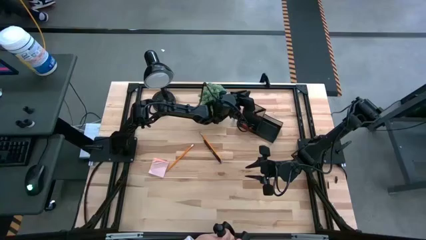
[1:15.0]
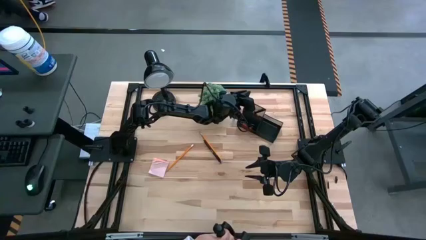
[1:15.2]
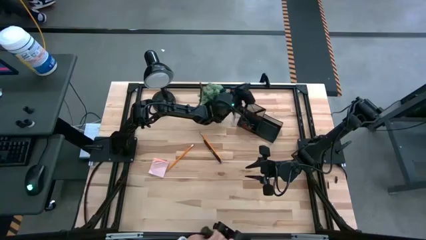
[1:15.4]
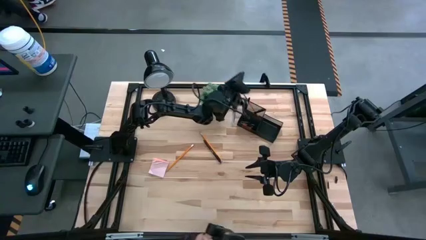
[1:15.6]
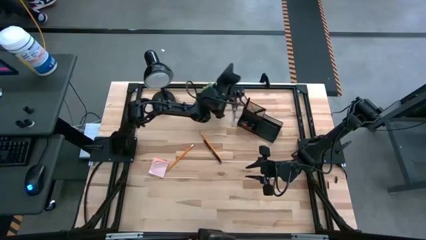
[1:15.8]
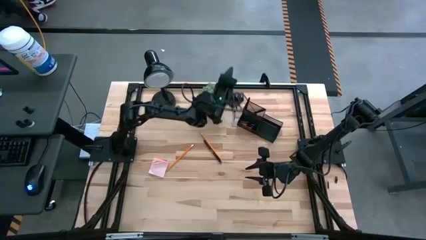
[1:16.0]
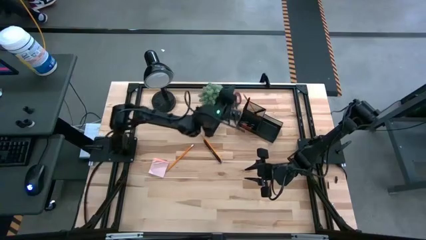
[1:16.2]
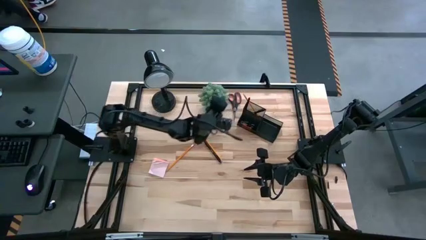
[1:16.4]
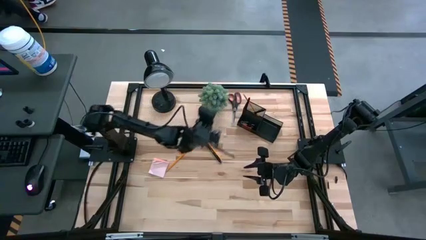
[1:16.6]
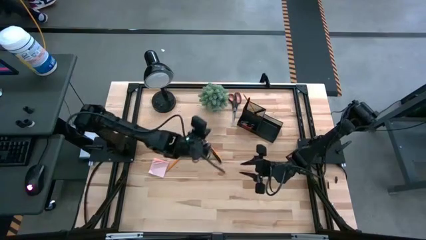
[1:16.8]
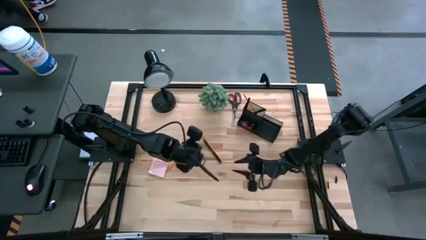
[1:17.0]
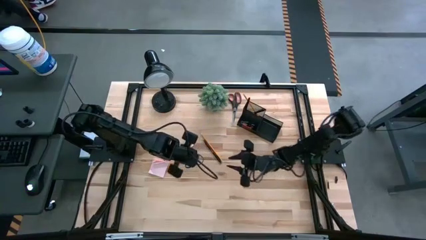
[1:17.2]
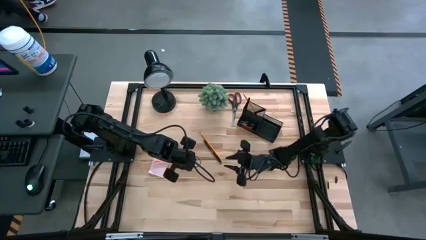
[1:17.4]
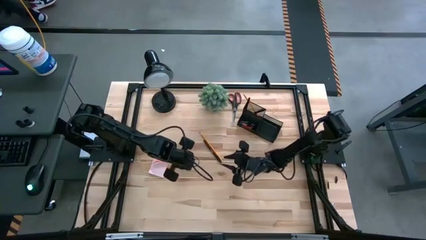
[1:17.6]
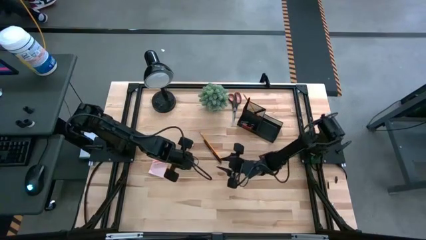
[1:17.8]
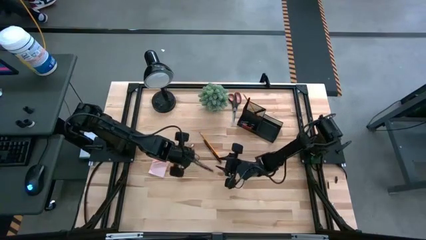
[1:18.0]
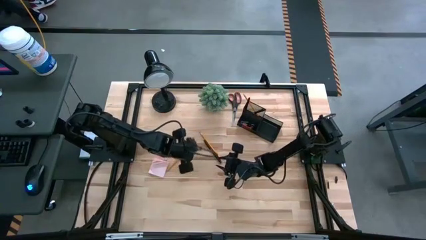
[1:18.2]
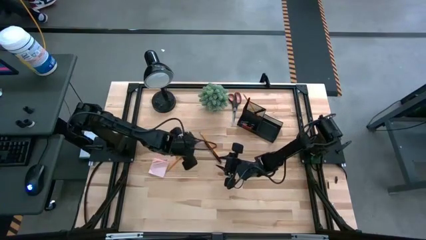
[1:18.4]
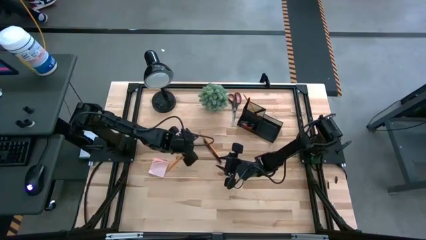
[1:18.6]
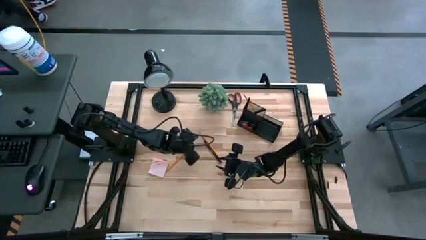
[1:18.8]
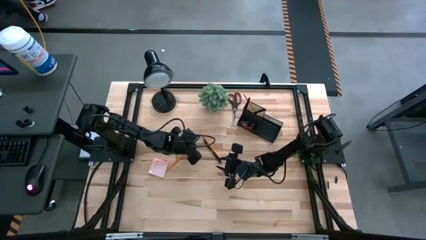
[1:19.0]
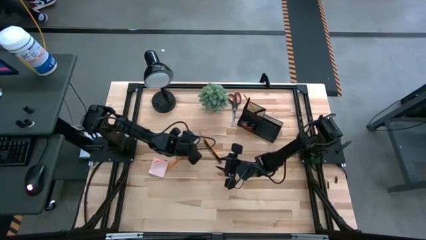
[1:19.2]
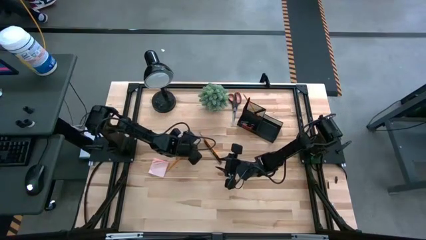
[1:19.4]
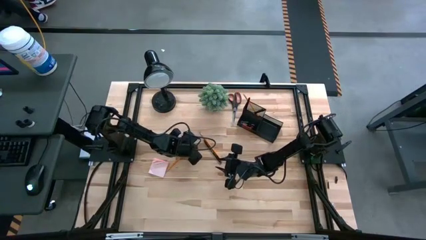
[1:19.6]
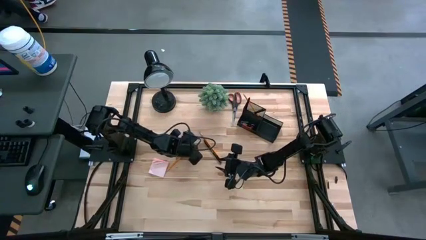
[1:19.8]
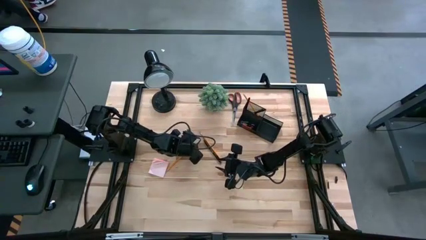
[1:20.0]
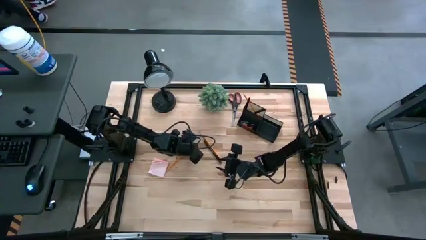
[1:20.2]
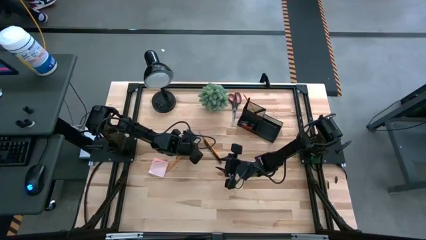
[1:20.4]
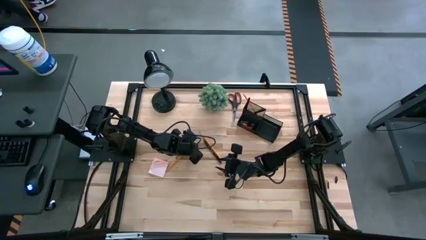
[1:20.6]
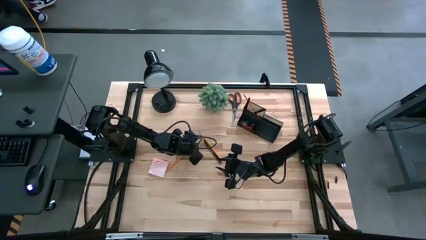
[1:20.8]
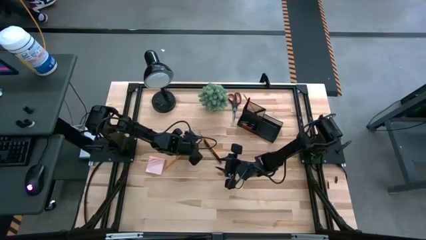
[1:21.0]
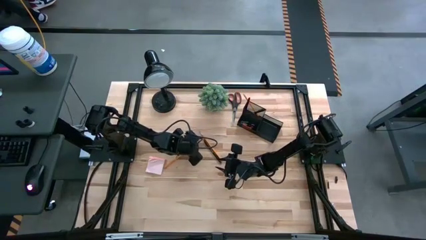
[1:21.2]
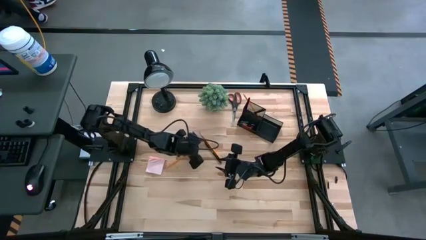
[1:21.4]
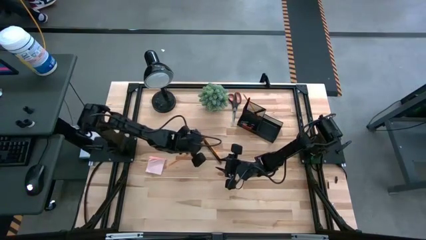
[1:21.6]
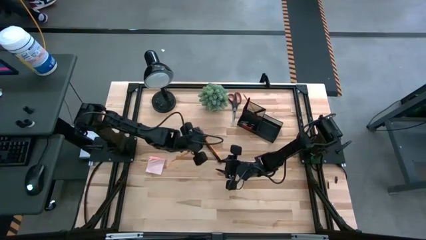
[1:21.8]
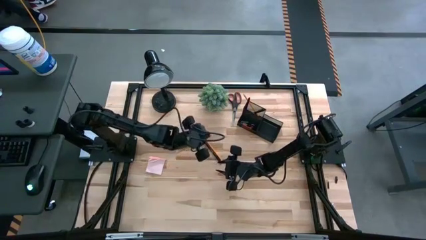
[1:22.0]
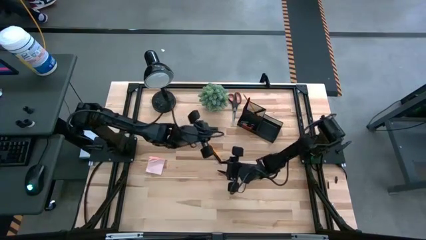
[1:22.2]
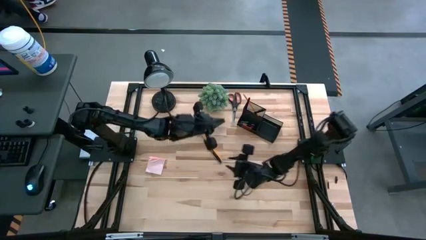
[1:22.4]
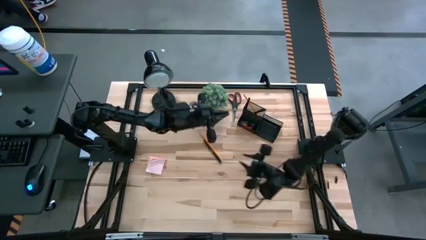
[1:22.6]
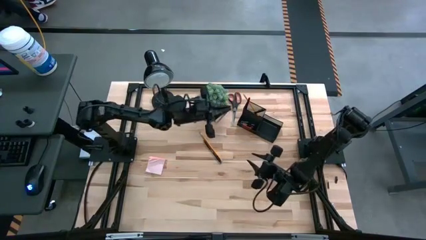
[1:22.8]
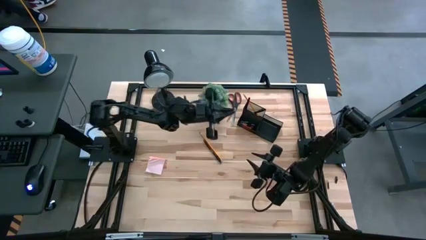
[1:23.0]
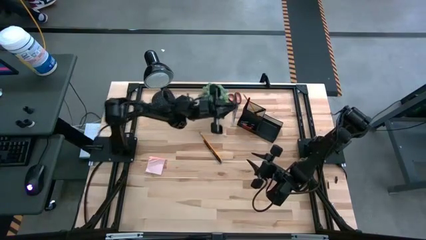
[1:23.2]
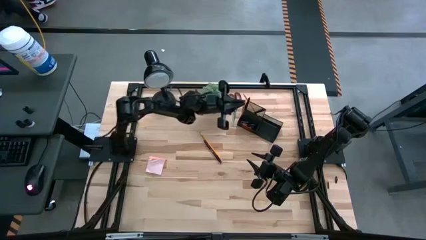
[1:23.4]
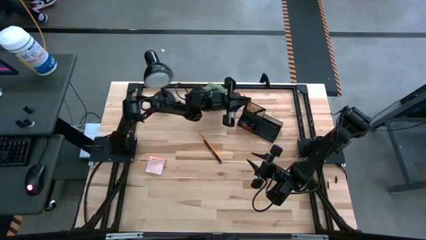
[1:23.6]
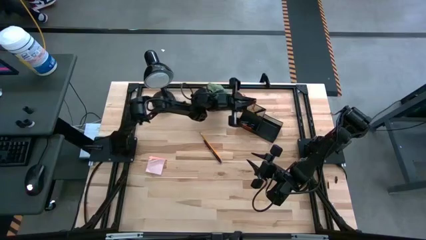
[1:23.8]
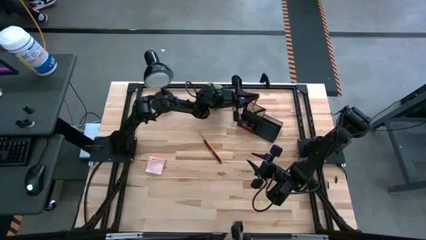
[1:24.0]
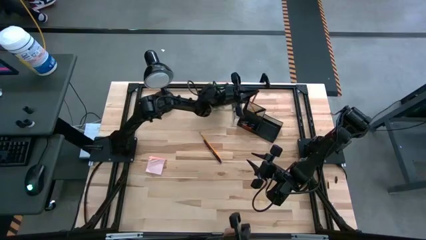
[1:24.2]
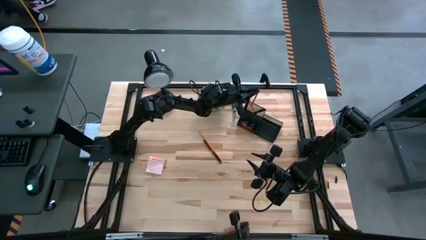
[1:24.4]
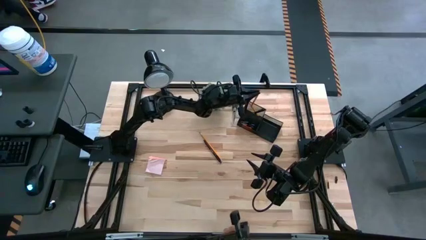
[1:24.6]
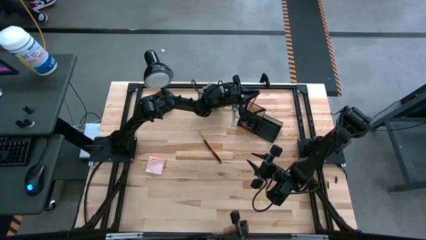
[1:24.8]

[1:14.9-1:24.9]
Task: Pick and place office supplies into organizer
Put the left orange pencil into the black desk organizer

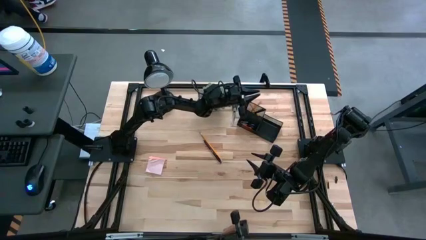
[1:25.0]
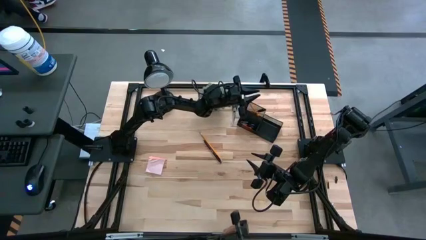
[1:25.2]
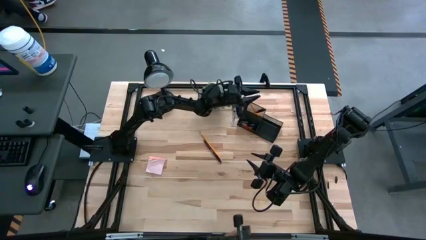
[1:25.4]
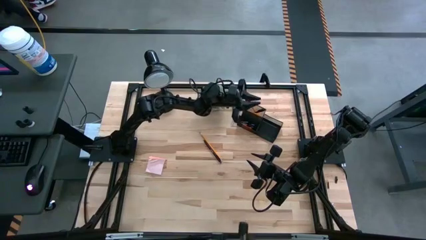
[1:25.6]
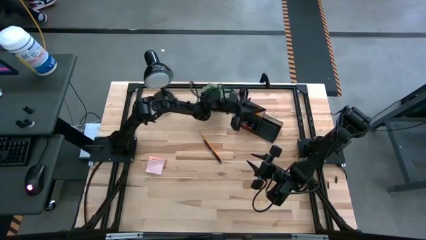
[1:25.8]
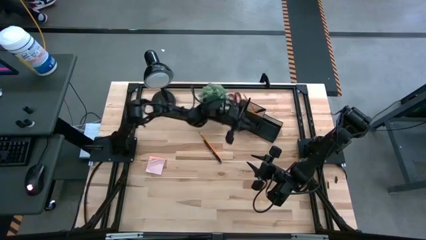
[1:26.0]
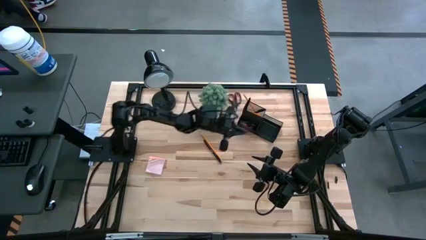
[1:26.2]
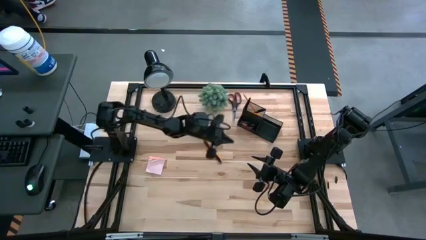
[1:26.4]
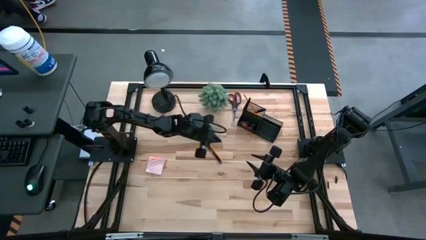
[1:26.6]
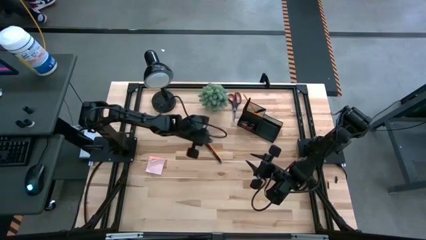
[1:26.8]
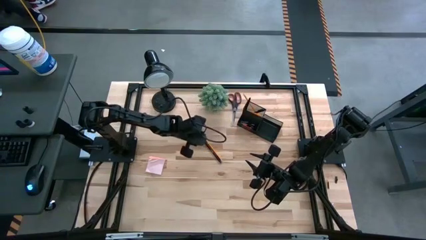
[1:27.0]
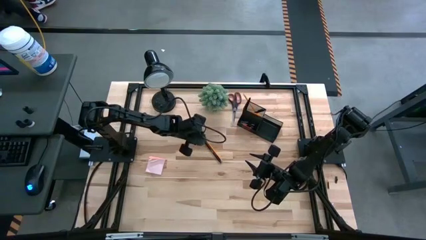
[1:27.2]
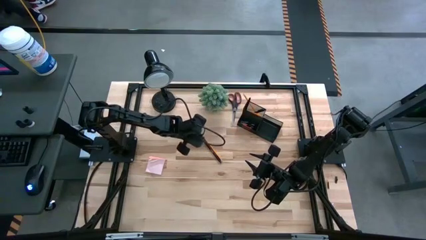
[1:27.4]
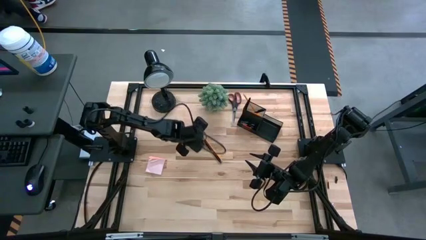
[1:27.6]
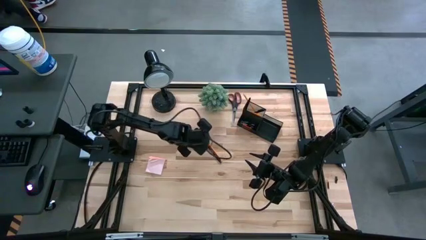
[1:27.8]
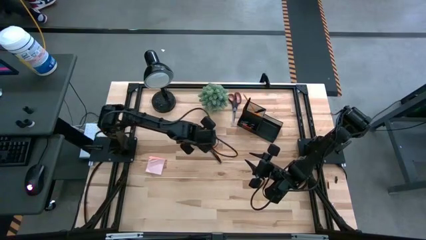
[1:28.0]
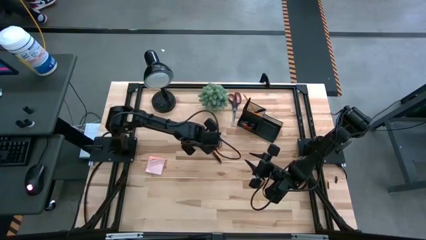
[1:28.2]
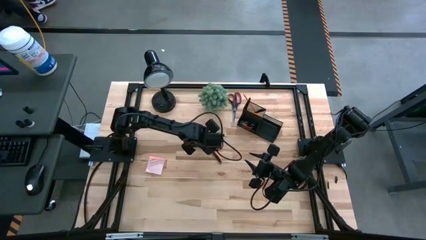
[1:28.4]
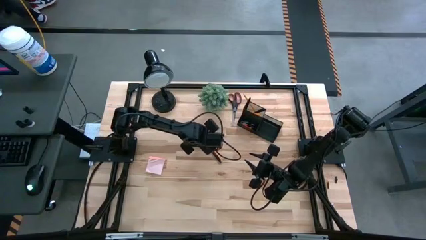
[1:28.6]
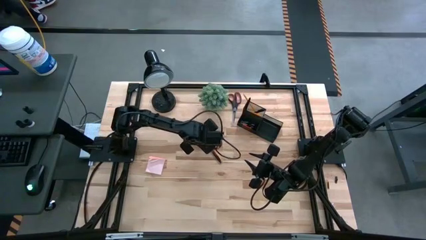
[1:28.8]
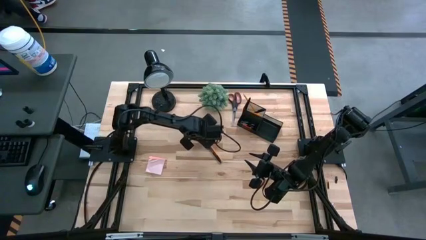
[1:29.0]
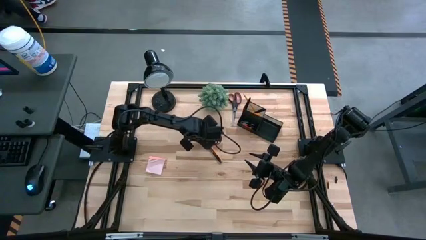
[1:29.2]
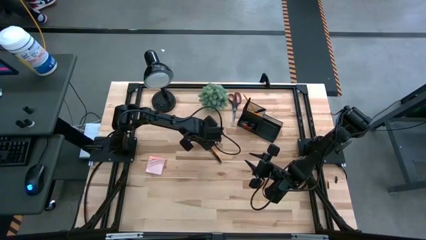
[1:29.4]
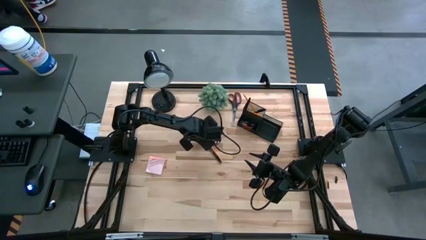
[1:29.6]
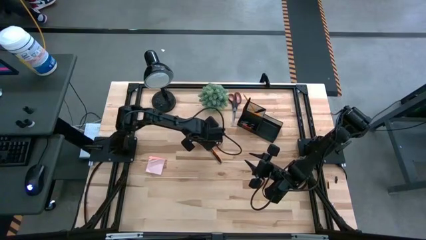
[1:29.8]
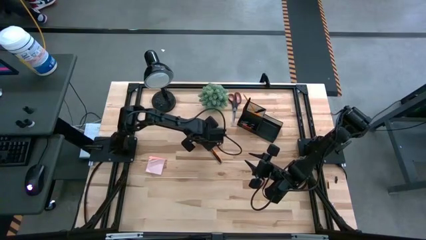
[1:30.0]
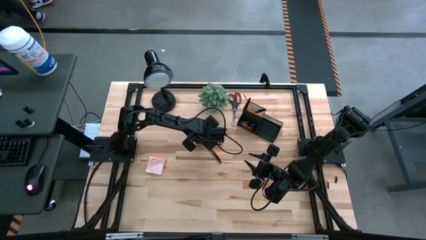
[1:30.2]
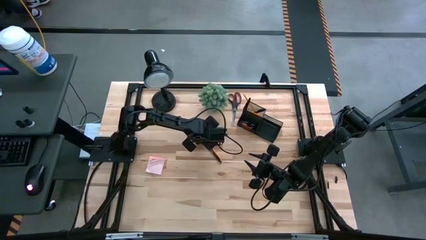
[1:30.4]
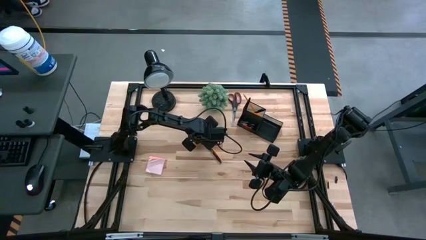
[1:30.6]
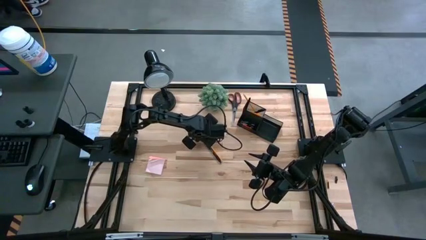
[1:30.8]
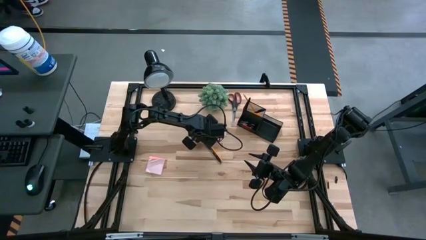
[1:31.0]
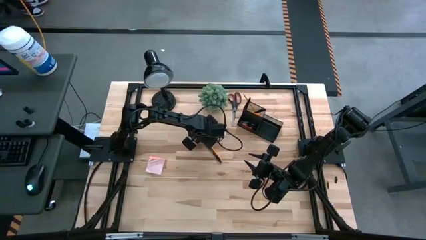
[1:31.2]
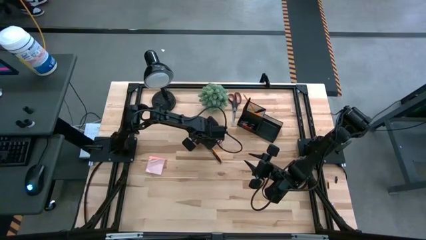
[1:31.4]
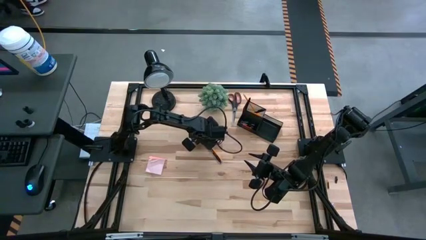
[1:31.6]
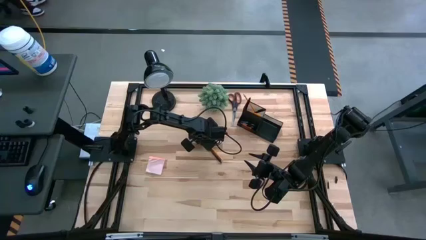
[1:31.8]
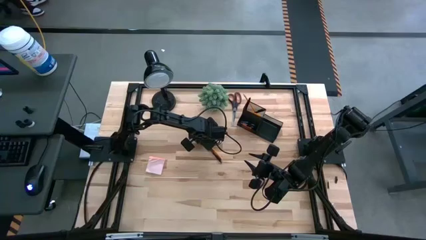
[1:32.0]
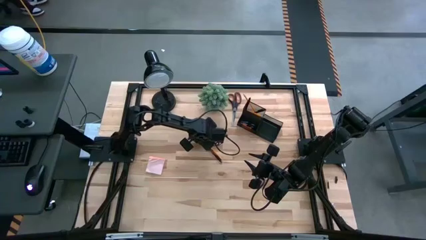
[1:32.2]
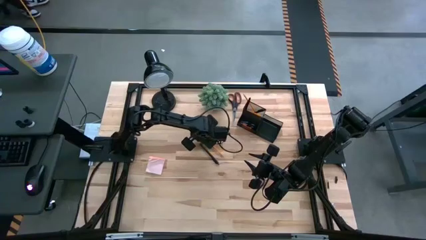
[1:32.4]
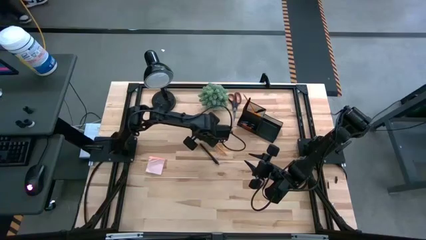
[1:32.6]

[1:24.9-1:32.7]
Put the orange pencil into the black desk organizer
